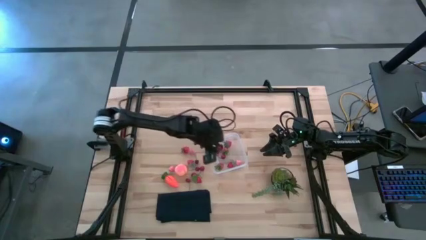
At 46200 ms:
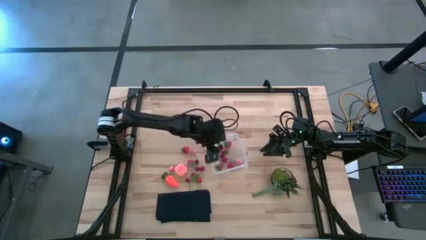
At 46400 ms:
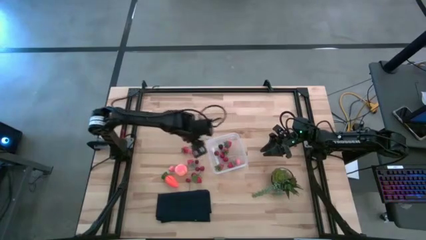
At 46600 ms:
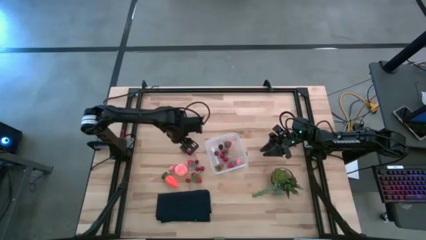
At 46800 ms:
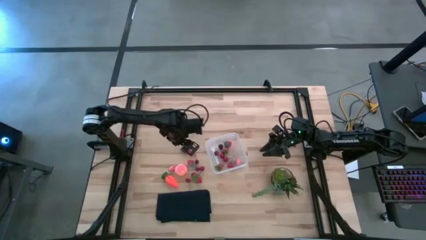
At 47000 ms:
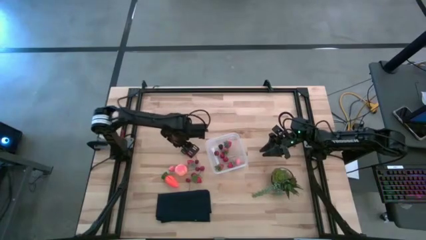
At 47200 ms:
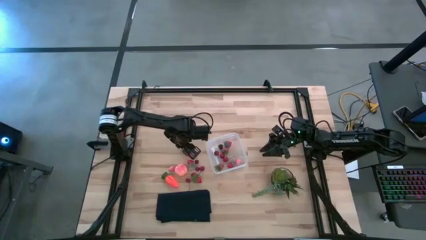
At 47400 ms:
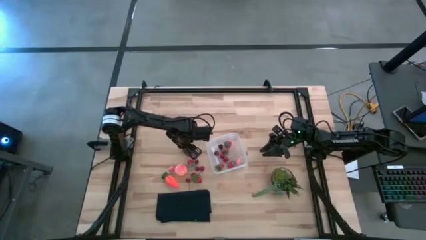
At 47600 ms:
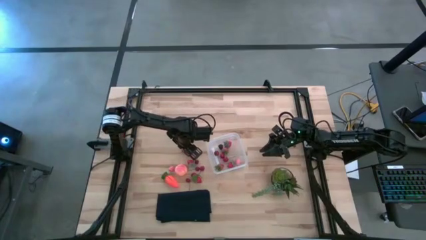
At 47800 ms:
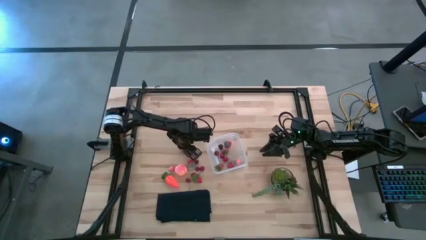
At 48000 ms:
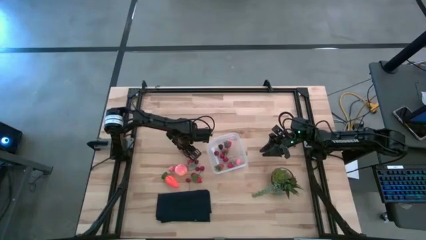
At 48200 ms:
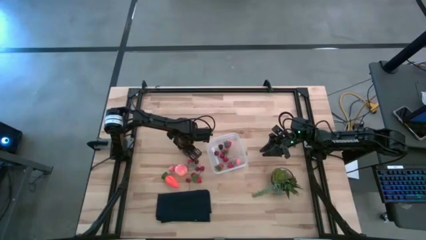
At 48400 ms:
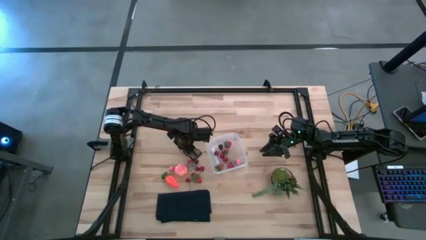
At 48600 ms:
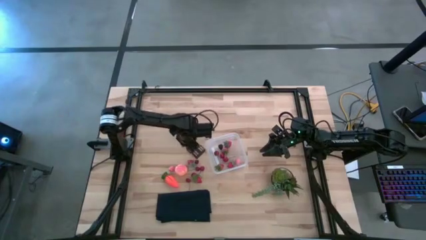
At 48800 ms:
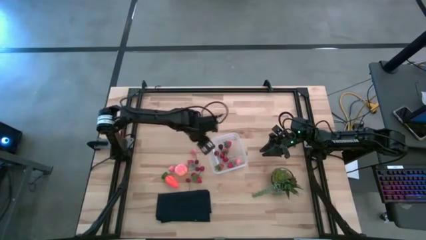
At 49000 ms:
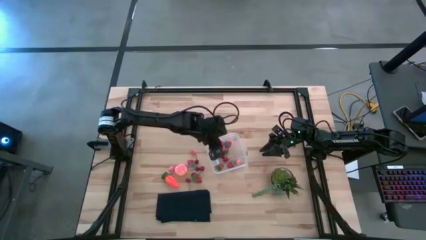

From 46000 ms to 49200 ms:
Task: Pick and placing Produce into tupperware
Put the red strawberry into the container

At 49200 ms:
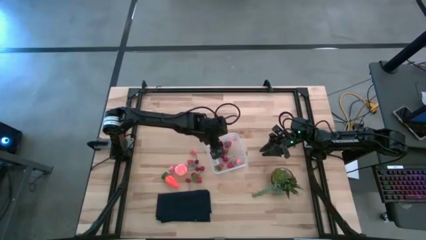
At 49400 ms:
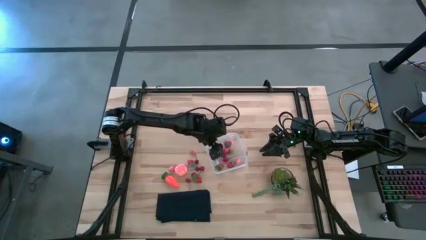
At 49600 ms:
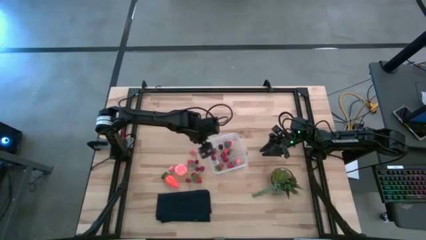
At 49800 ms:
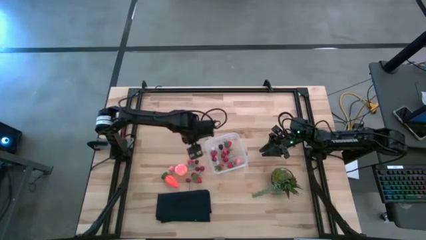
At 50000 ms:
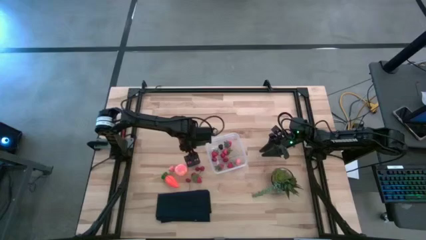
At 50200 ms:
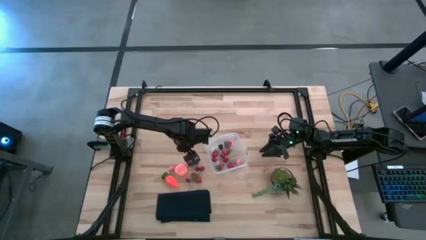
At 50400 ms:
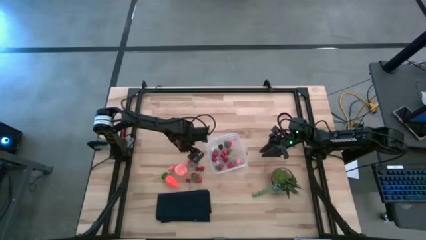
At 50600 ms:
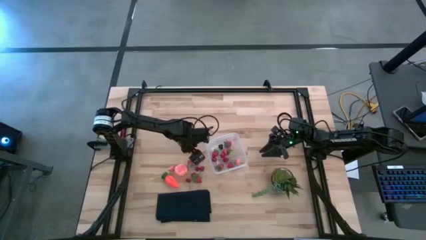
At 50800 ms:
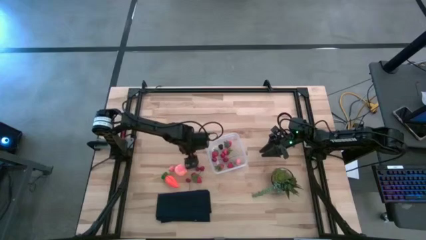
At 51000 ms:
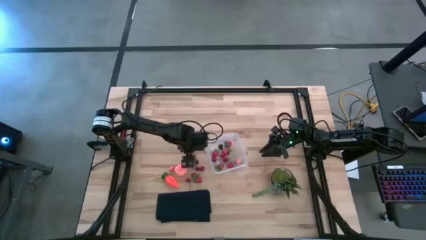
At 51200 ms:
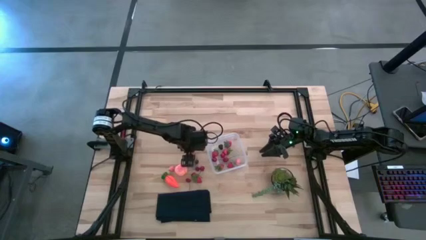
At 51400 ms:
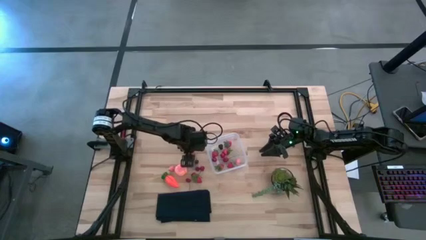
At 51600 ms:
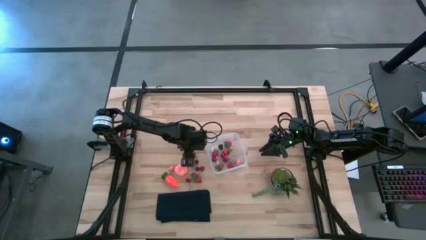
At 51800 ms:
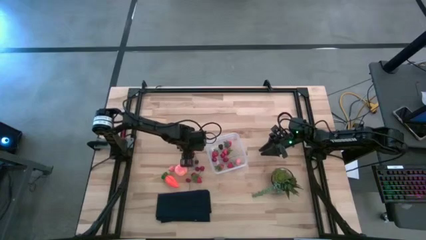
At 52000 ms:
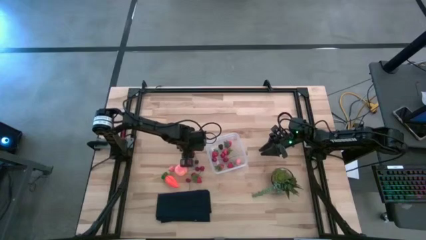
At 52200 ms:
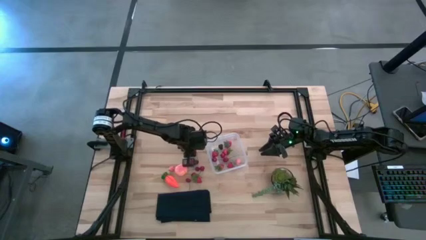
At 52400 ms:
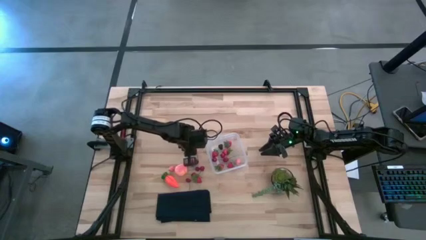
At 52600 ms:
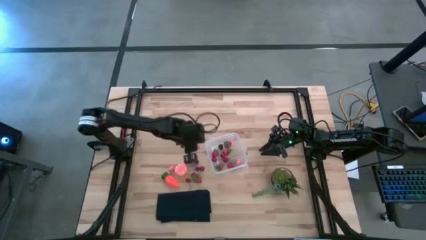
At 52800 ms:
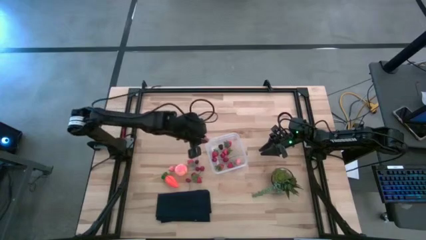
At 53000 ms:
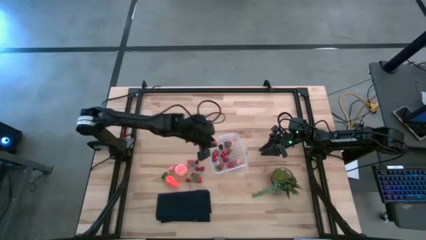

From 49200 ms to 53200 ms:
Put the pink peach into the container

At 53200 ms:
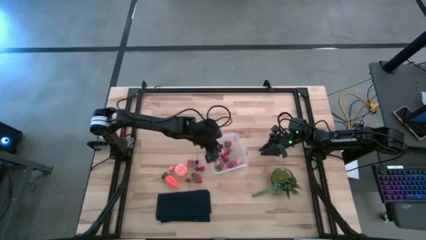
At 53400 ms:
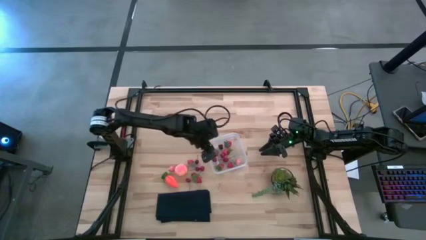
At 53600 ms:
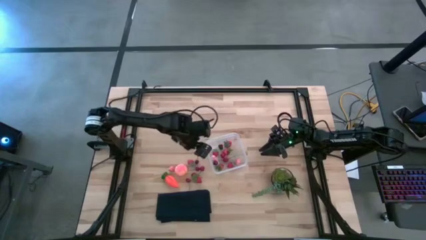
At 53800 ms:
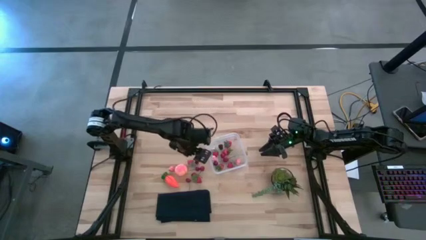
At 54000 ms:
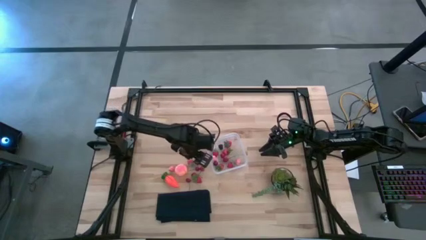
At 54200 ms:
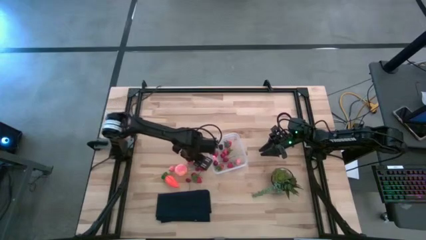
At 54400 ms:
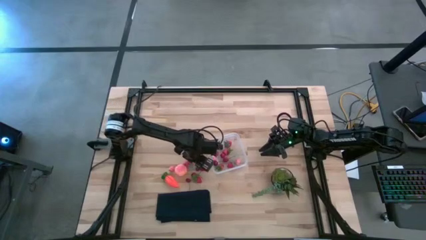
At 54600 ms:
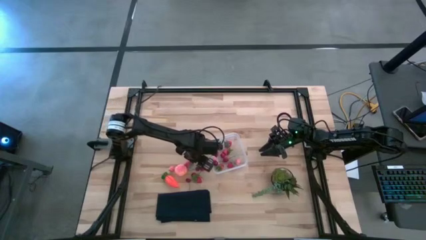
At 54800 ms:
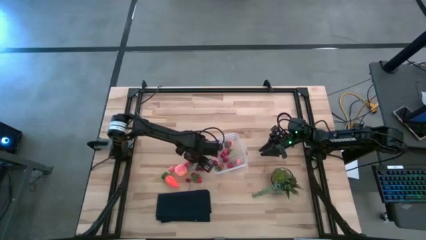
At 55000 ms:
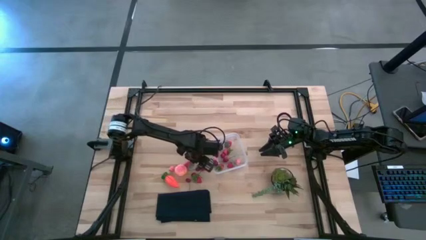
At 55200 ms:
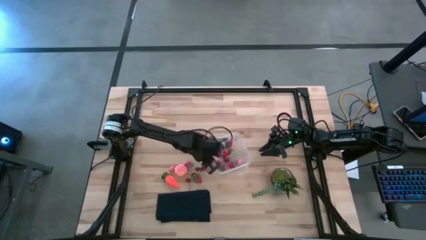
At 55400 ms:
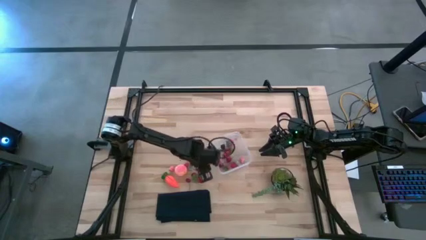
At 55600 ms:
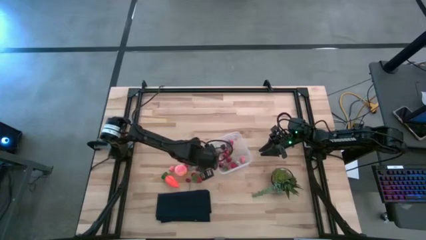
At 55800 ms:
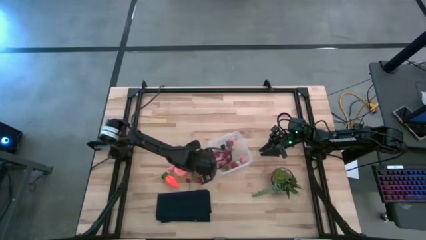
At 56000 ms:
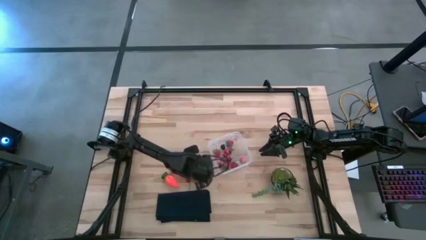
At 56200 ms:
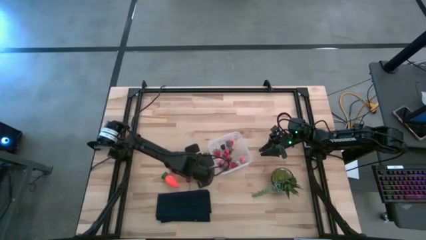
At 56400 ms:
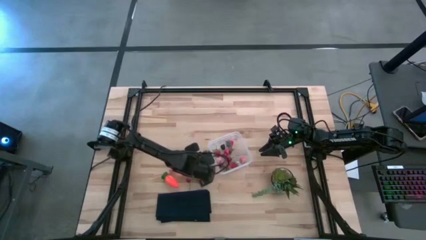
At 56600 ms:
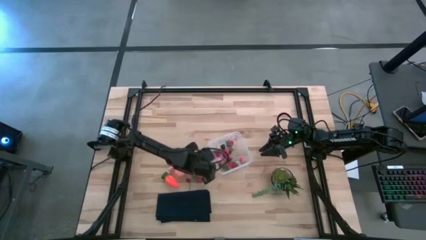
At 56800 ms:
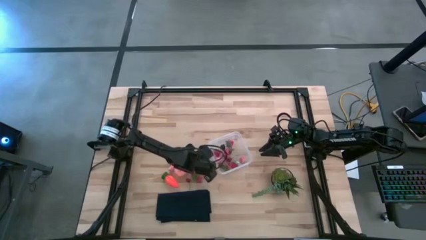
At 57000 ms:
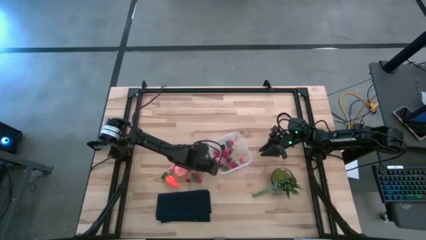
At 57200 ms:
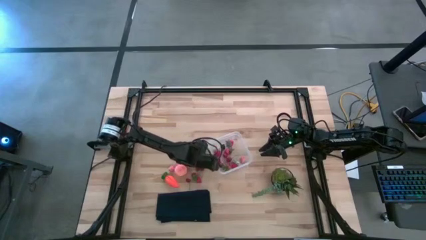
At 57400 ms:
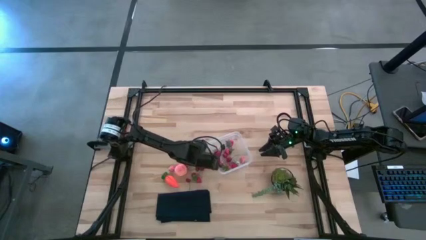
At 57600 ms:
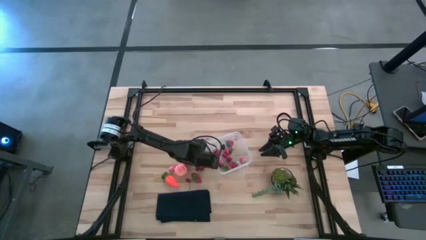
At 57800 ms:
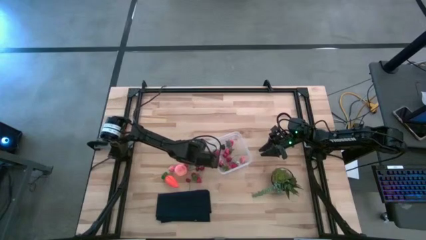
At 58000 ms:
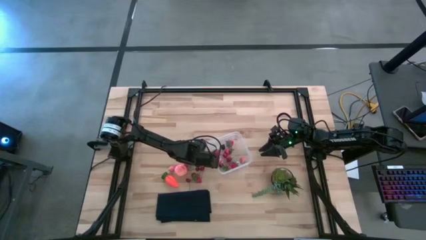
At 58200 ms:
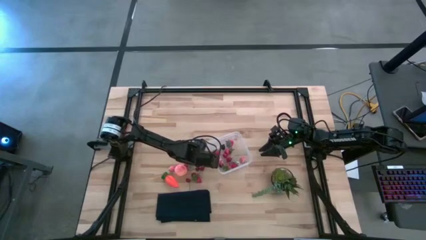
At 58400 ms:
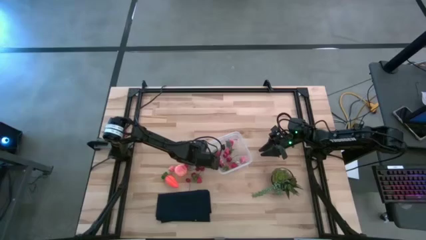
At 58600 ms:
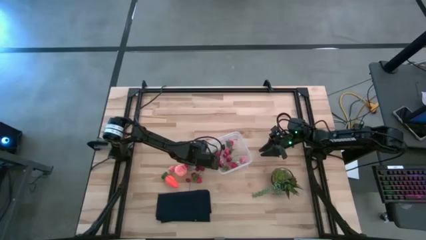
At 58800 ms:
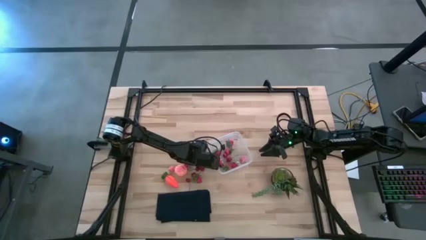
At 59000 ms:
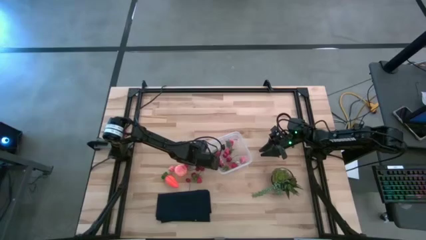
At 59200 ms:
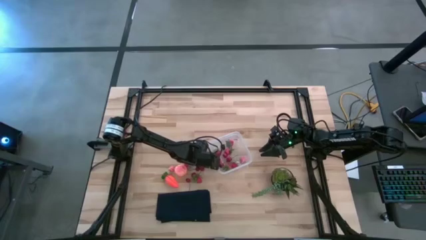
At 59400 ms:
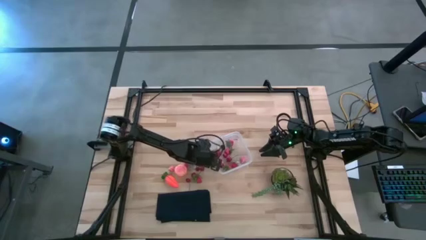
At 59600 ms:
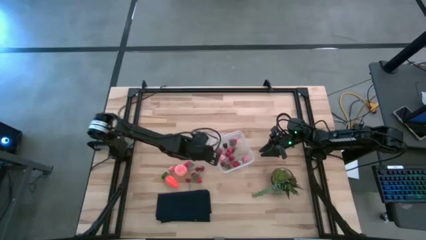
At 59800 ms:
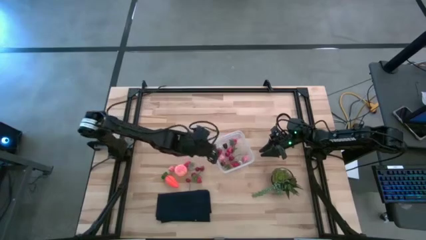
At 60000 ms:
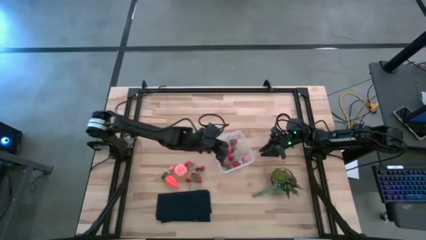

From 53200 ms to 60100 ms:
Put the red cherry into the container

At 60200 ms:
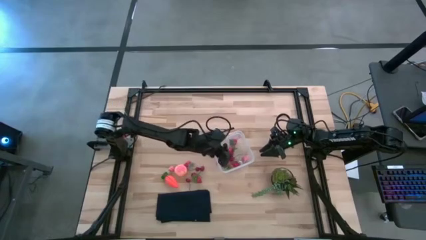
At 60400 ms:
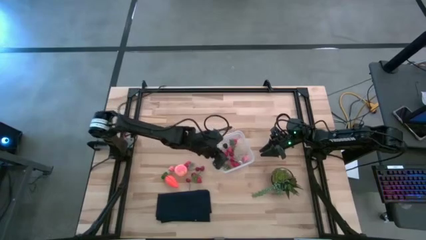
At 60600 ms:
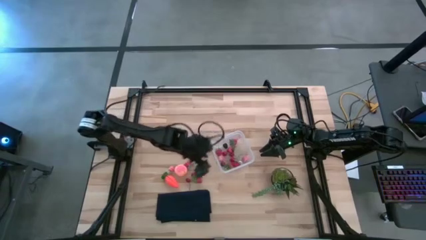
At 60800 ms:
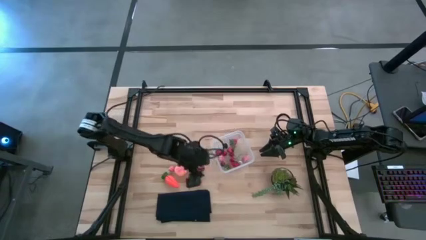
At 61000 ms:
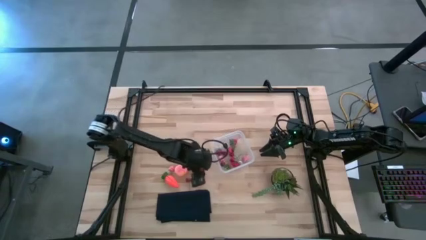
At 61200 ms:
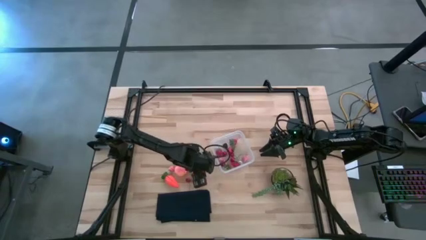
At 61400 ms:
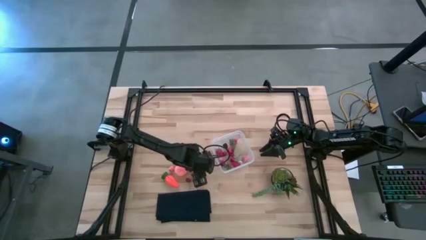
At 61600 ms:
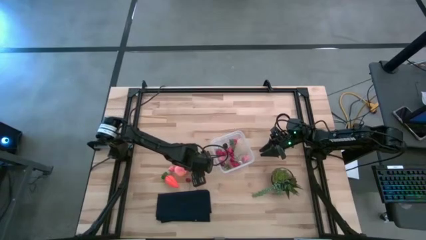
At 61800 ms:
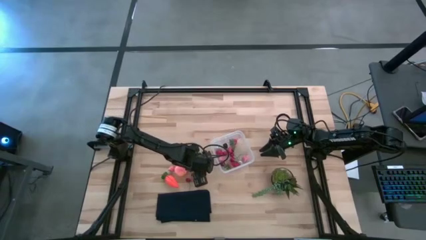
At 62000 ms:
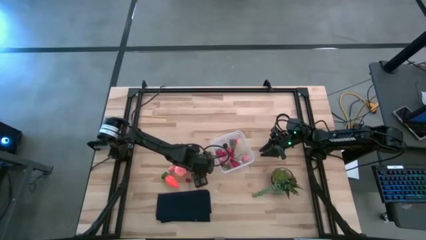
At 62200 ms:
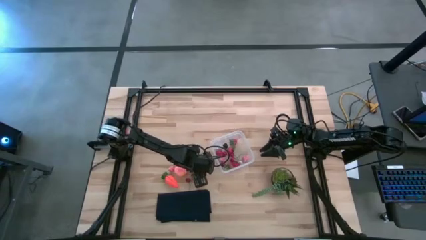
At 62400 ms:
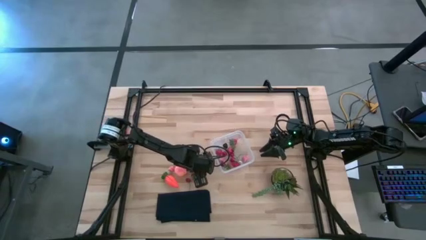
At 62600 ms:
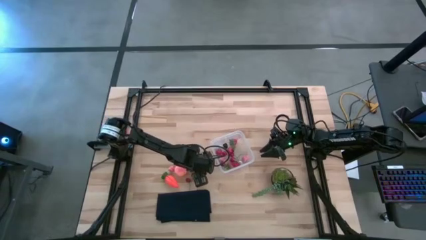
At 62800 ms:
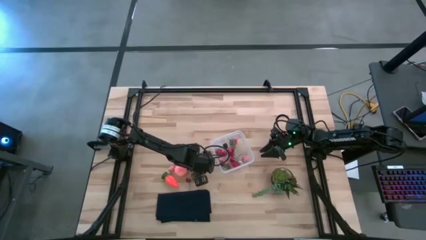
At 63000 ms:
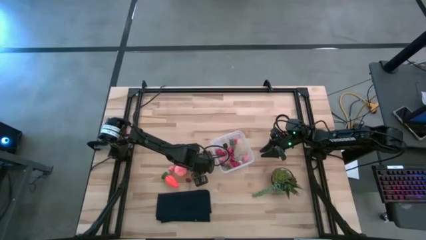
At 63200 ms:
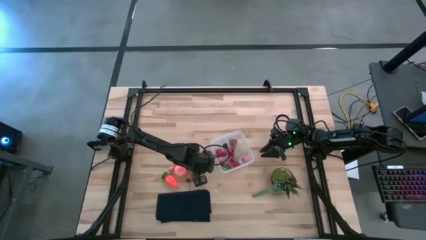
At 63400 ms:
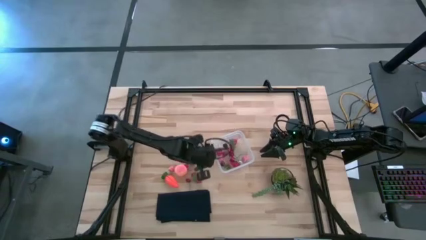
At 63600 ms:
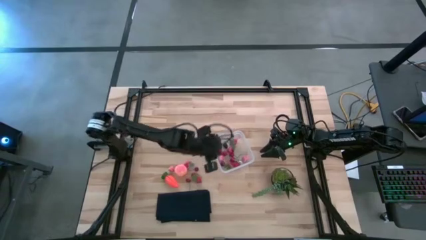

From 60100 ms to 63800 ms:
Put the red cherry into the container
